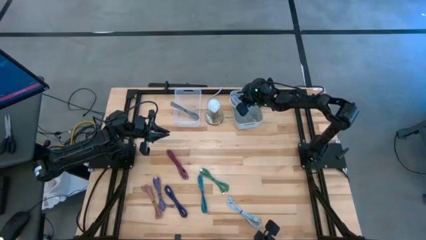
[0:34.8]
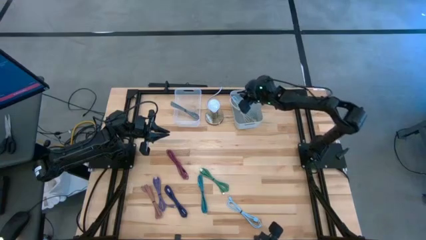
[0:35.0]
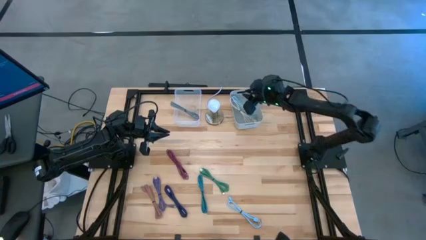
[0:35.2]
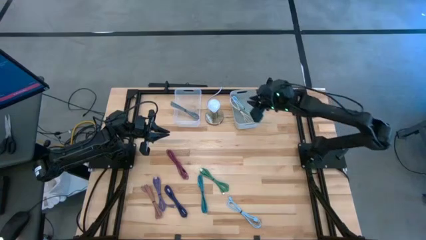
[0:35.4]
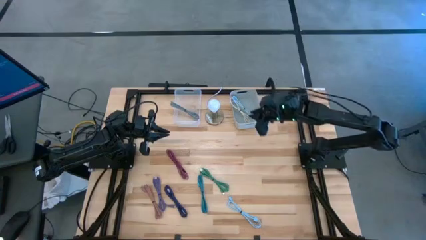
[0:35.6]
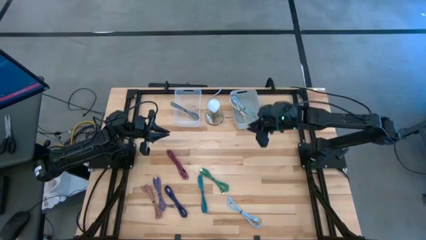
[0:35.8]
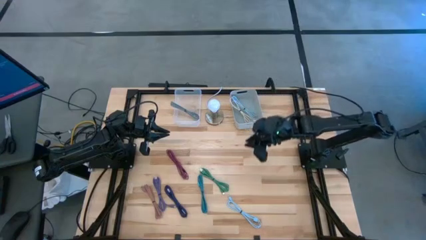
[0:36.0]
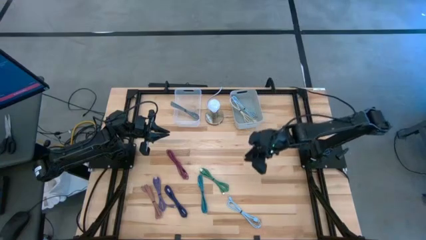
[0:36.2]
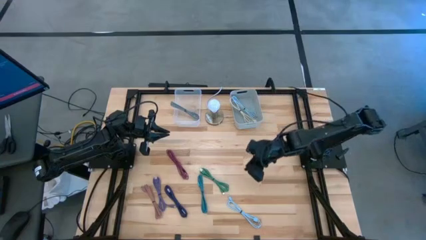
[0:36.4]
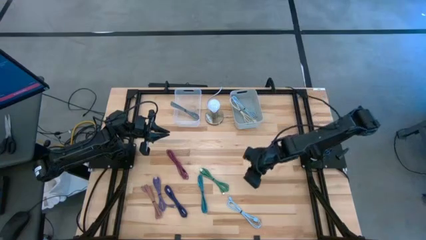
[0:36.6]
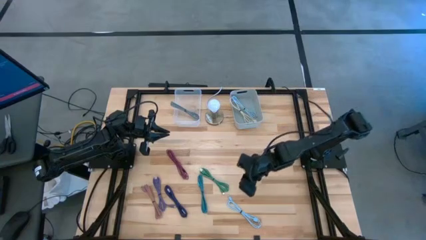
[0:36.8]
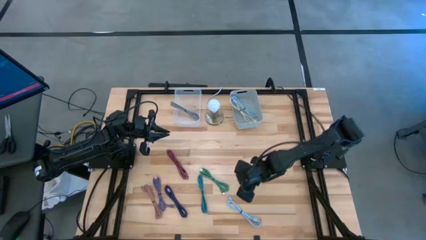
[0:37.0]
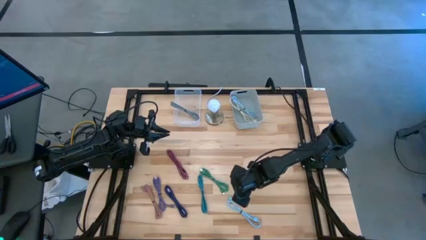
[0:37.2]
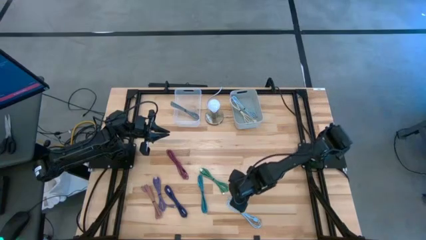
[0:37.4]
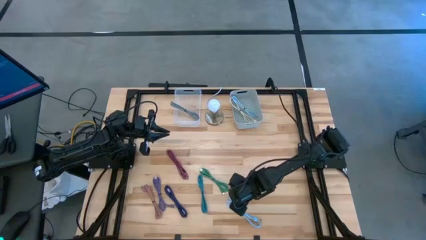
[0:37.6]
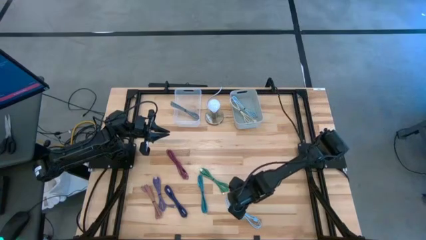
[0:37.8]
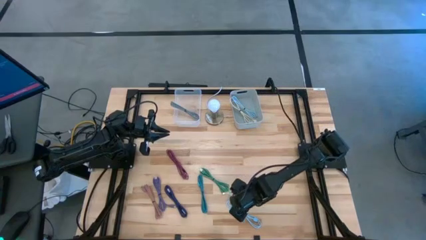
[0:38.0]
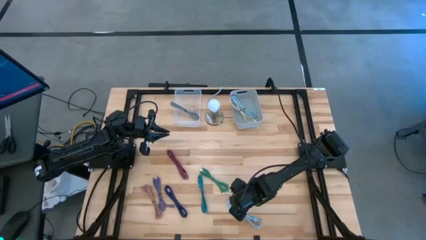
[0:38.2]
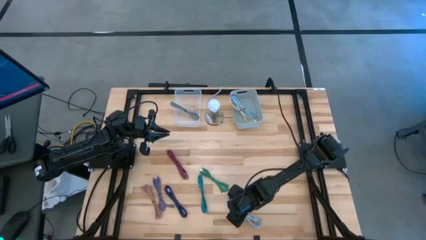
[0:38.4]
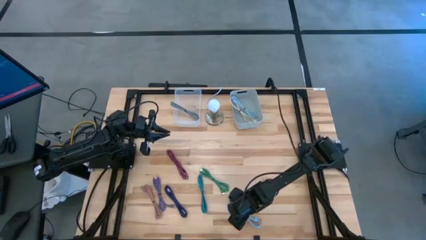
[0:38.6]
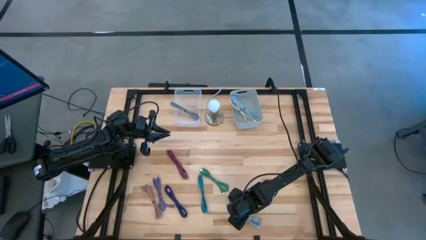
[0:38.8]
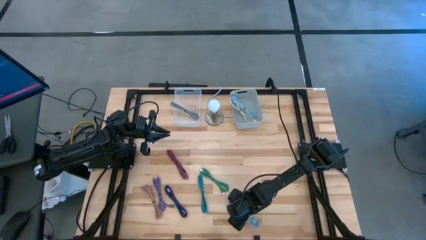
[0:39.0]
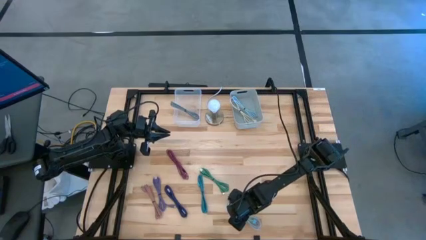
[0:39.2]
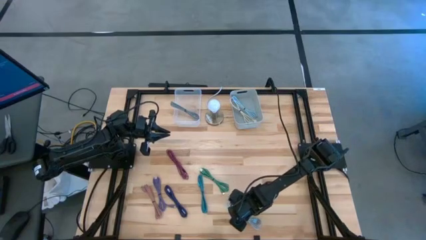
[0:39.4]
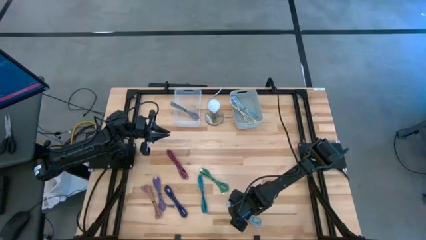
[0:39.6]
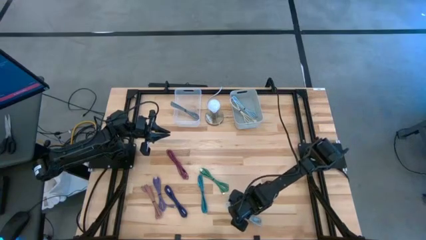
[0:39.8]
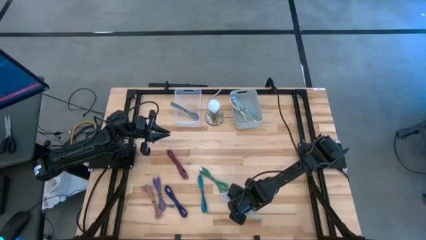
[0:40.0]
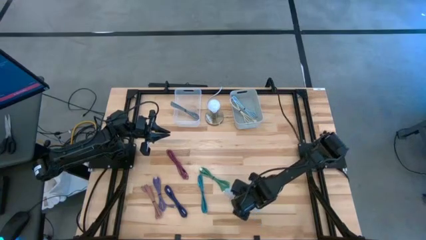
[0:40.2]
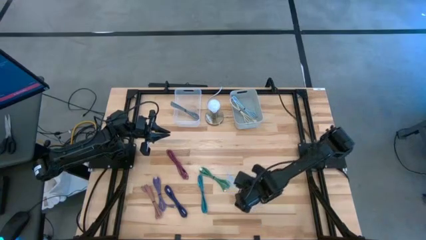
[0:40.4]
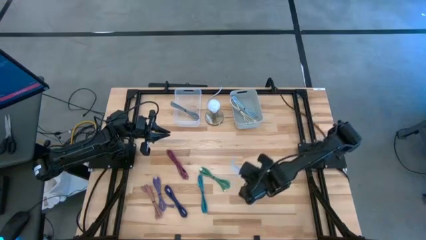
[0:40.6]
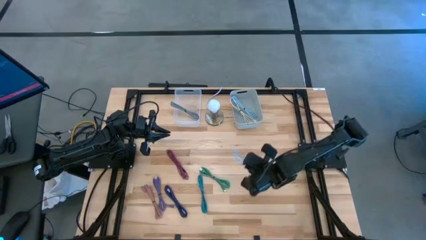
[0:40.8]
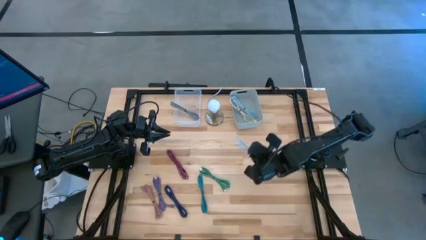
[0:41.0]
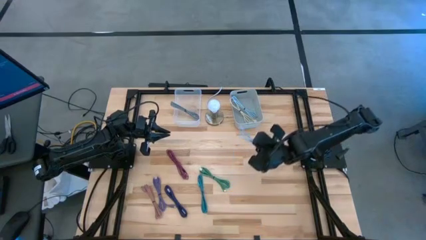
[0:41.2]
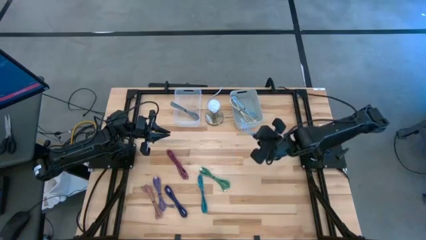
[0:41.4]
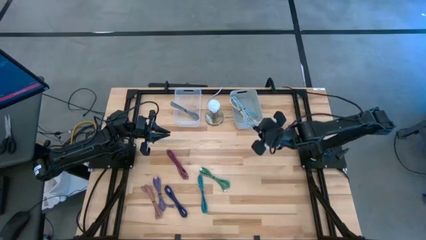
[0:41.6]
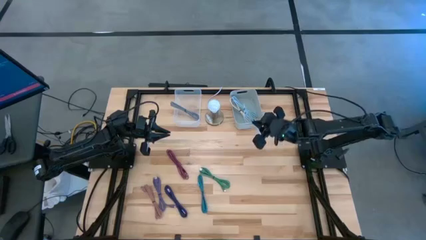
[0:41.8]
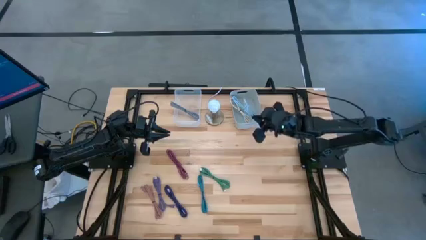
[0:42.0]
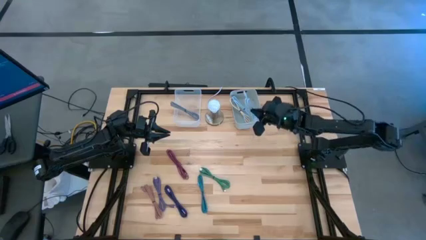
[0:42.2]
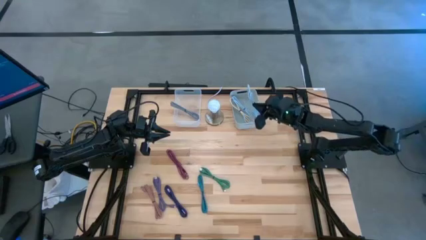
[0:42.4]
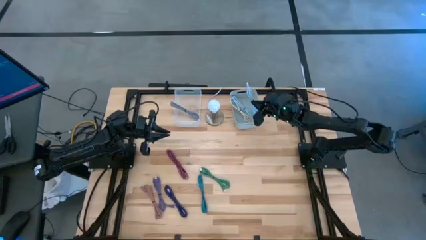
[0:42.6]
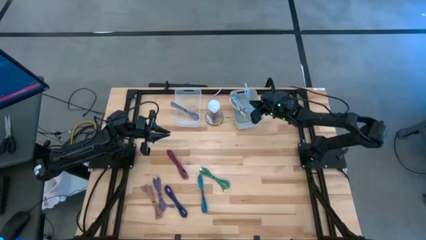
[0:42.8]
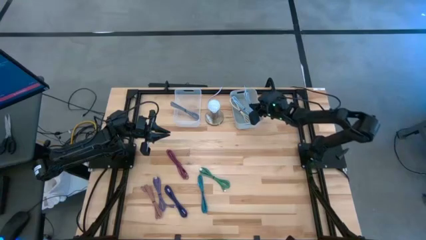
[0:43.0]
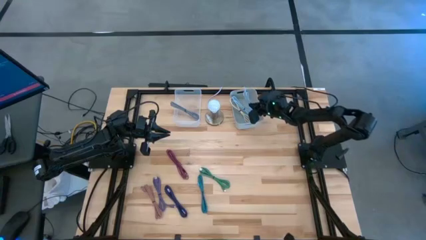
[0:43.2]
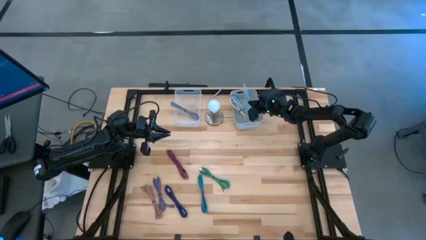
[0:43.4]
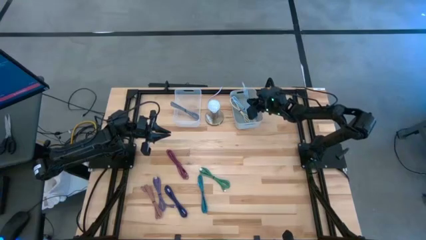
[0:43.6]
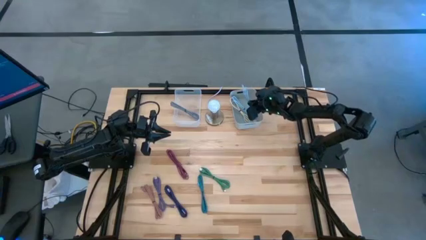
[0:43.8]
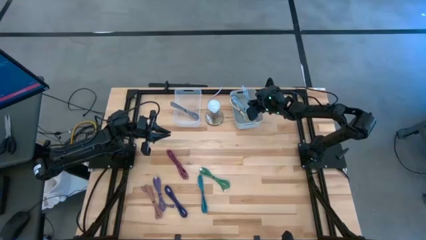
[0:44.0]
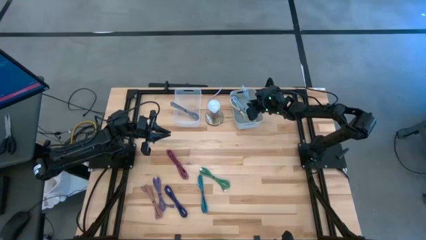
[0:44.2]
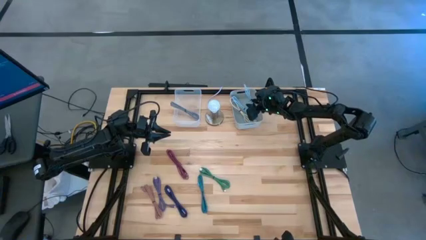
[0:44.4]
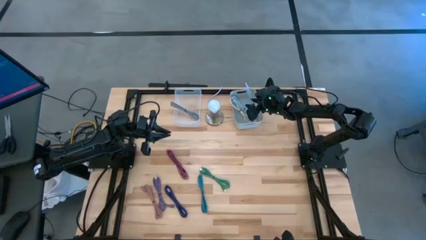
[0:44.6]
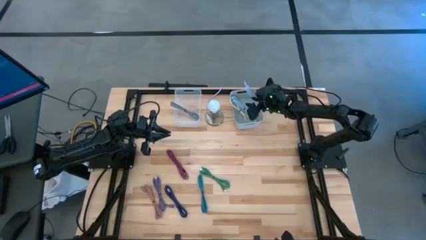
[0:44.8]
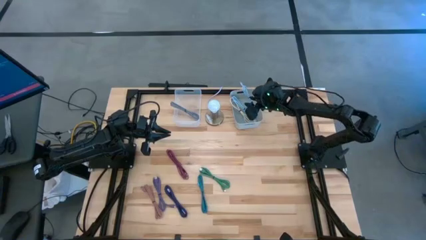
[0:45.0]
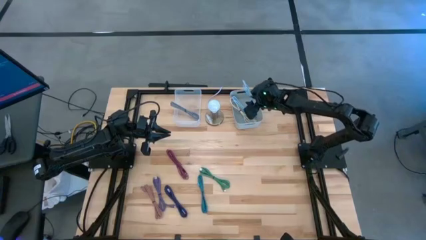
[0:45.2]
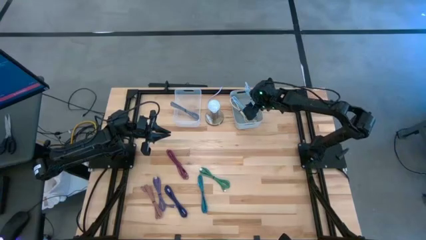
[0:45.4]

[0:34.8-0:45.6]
Task: Pick & Place USB Port
Put the light blue charger cable into the gray bin

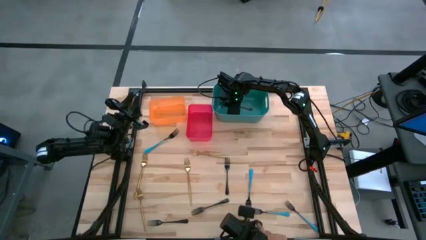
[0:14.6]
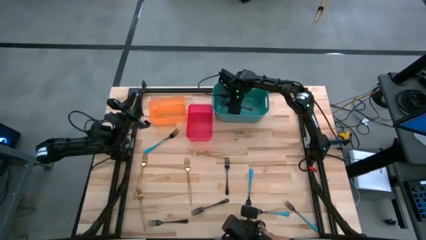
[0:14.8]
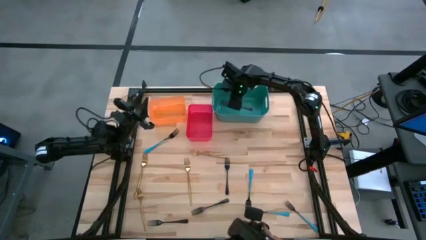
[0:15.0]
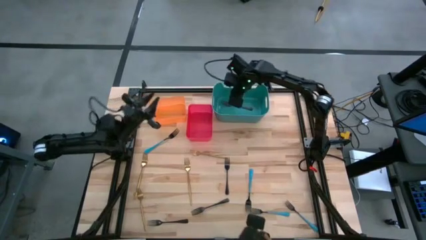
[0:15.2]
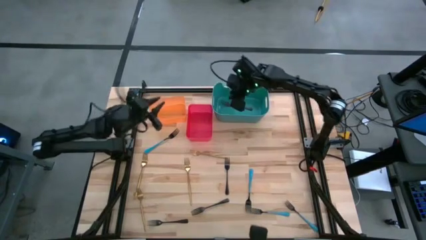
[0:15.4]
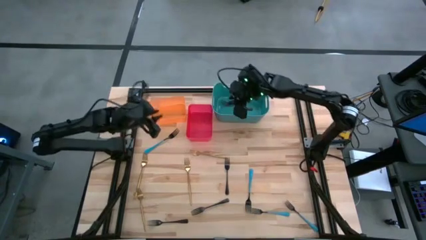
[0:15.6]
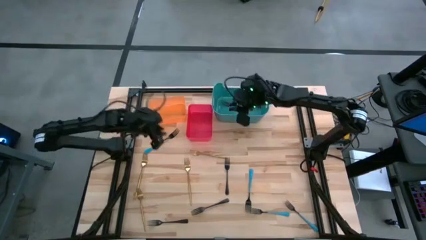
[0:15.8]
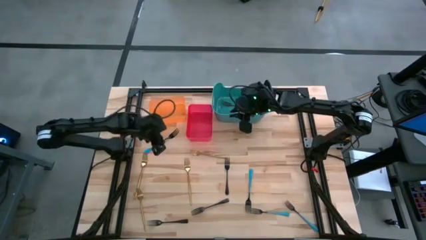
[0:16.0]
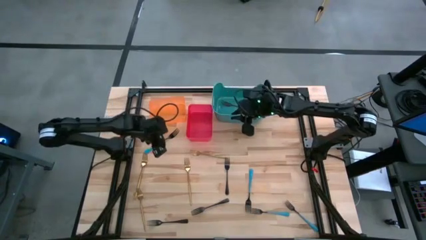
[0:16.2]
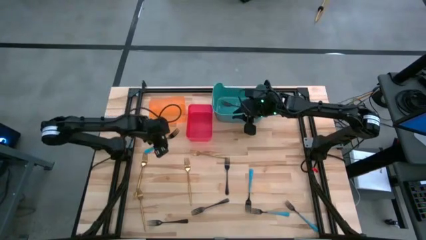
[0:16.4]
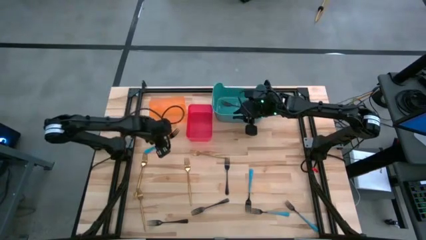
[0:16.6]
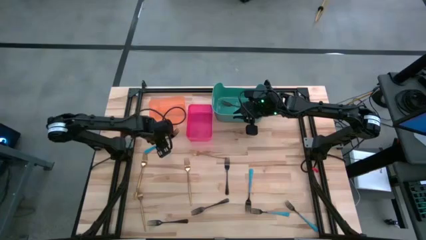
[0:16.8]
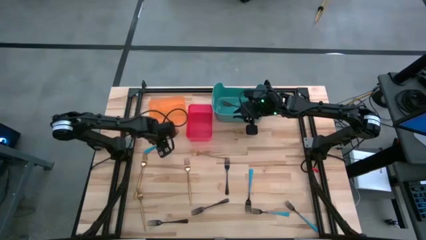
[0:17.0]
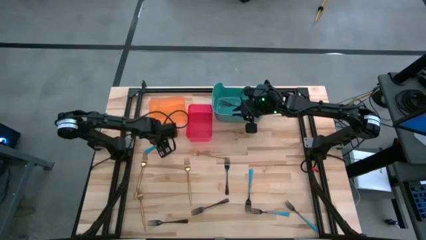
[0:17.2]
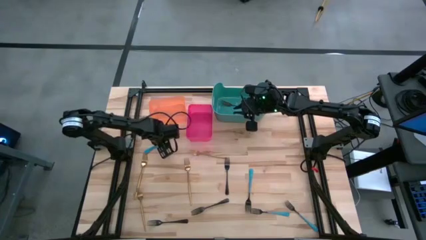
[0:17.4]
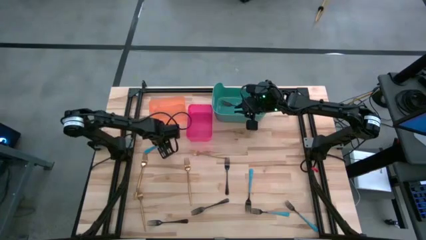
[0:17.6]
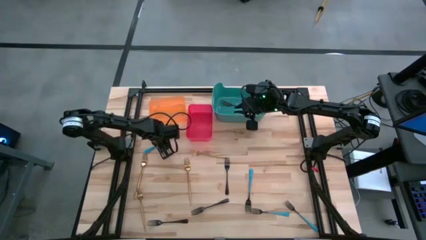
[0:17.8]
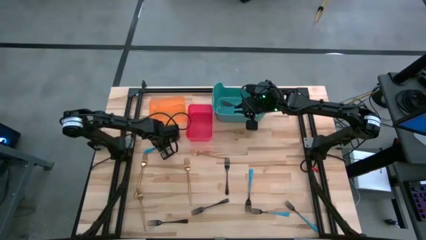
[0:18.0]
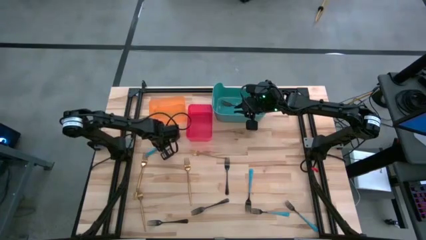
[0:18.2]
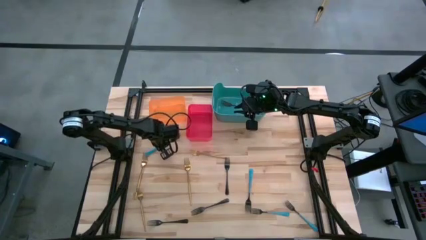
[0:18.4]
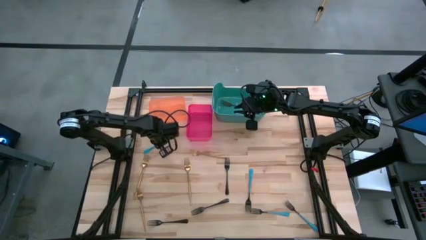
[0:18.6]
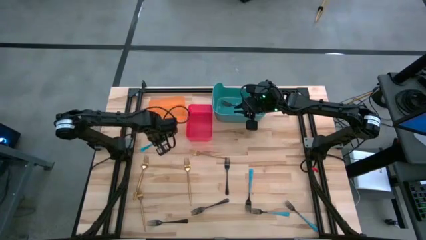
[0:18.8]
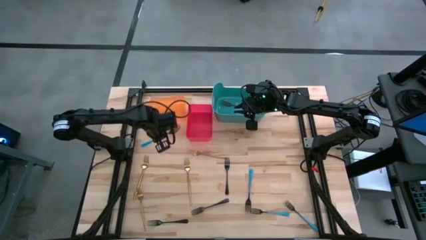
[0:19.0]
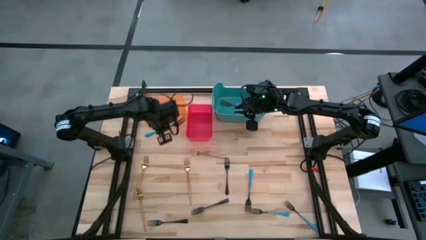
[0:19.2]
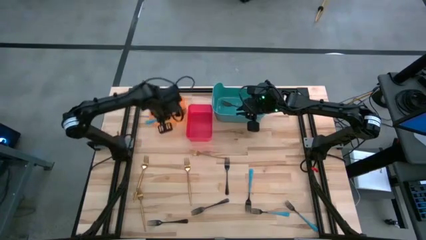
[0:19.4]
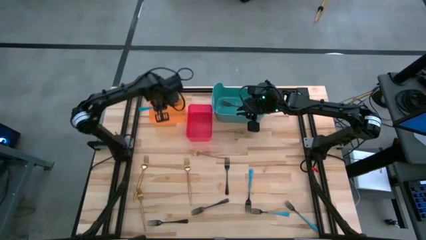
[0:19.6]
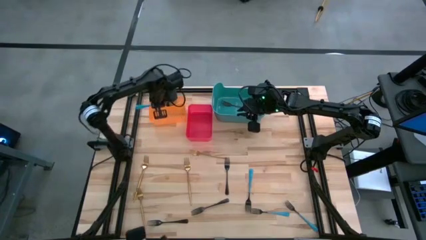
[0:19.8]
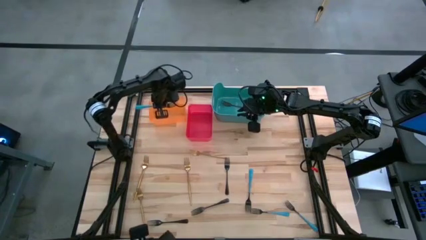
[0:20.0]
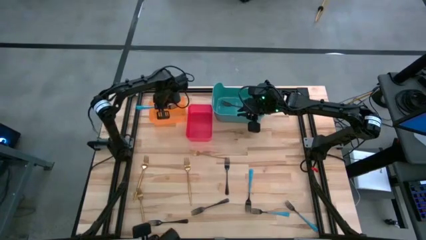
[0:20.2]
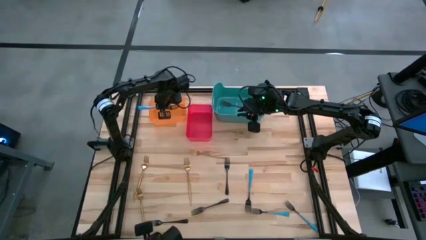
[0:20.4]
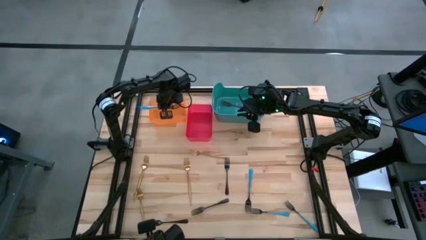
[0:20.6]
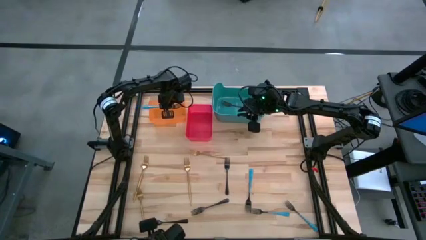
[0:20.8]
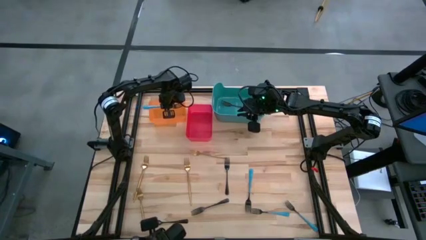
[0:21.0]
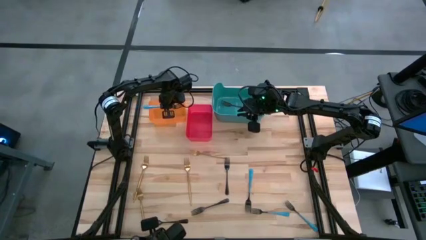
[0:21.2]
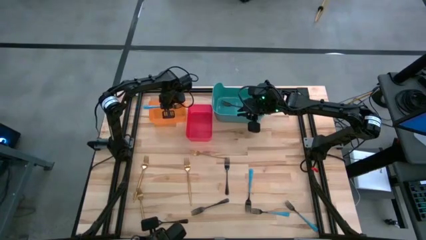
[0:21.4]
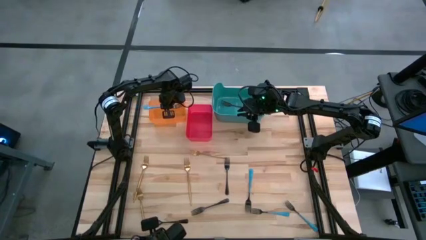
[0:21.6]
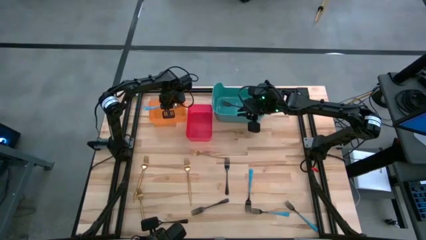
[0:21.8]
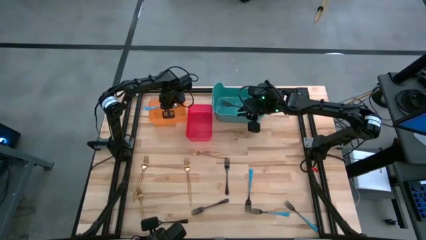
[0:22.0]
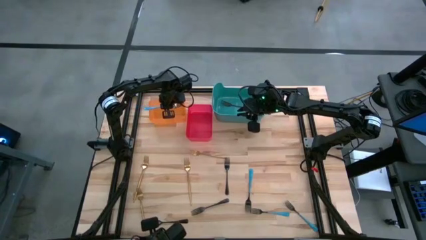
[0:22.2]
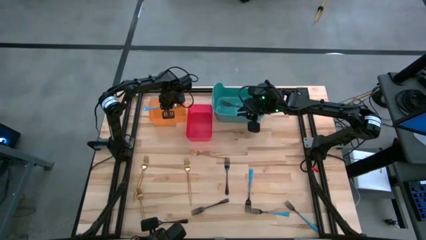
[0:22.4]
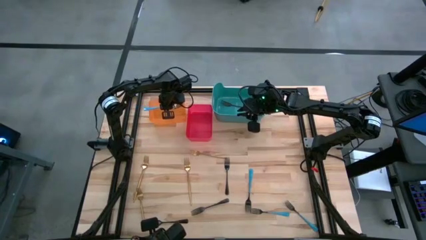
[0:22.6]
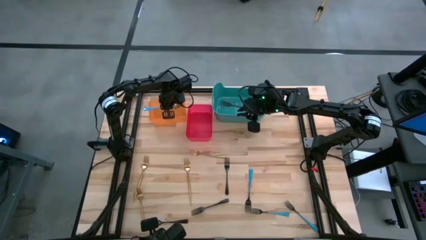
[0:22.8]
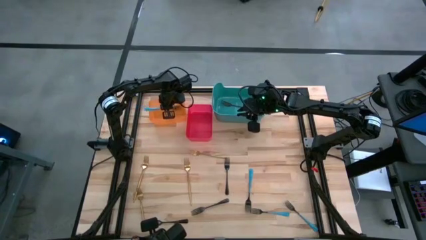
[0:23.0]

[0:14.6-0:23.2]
Task: Sort silverware by color (type)
Put the blue fork into the orange bin
